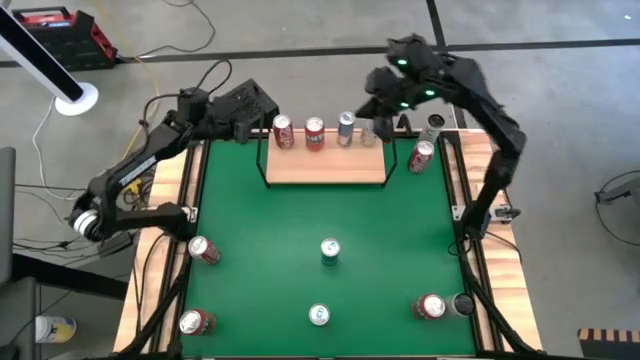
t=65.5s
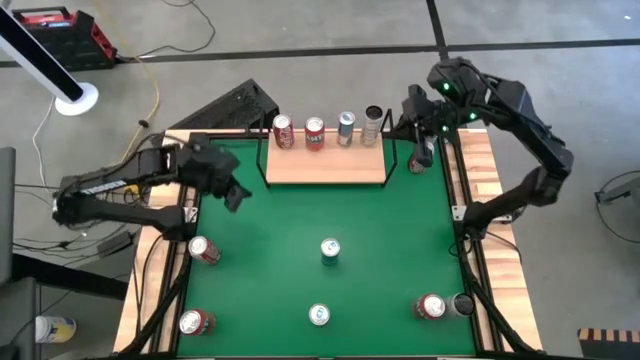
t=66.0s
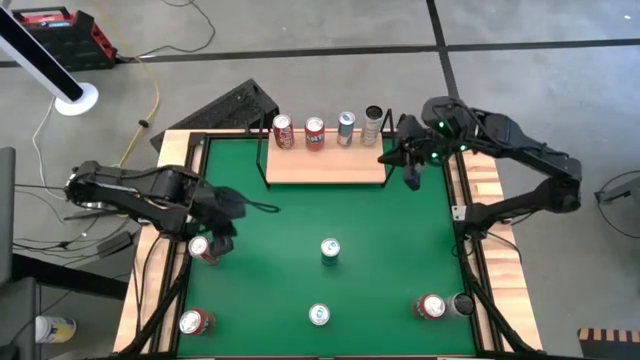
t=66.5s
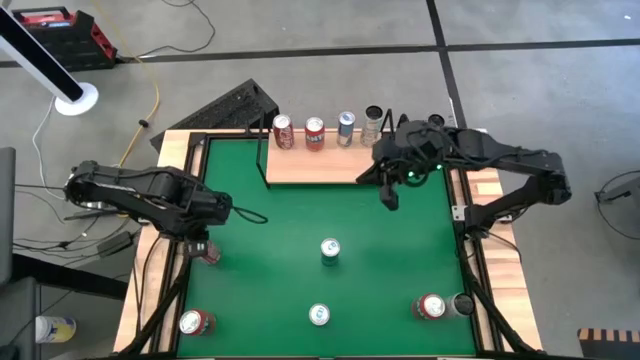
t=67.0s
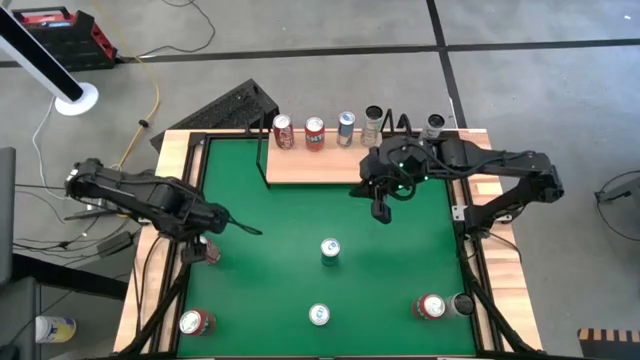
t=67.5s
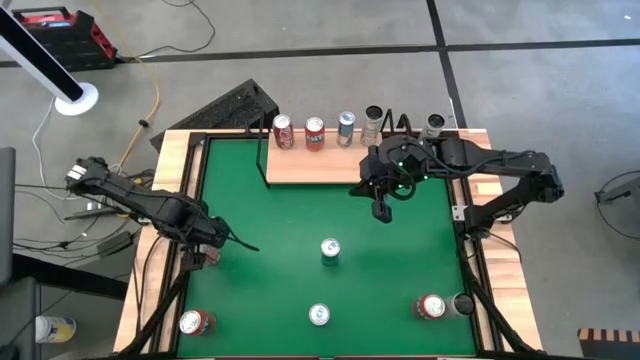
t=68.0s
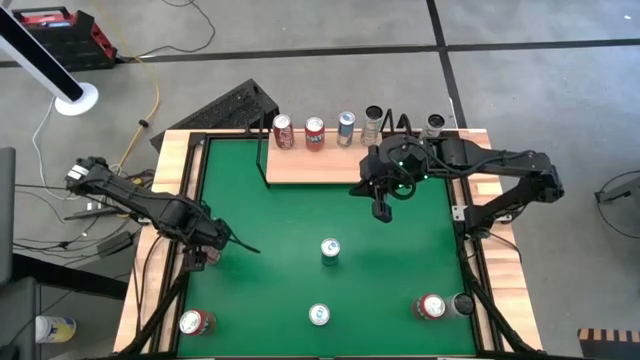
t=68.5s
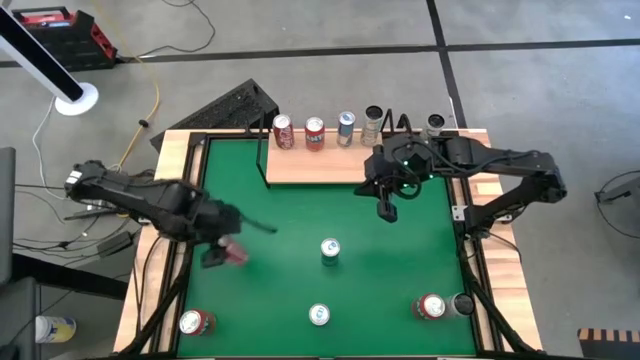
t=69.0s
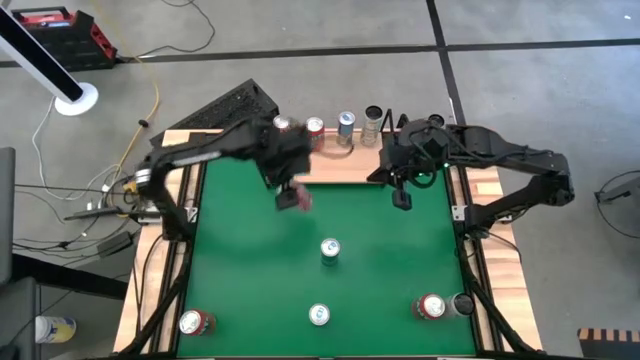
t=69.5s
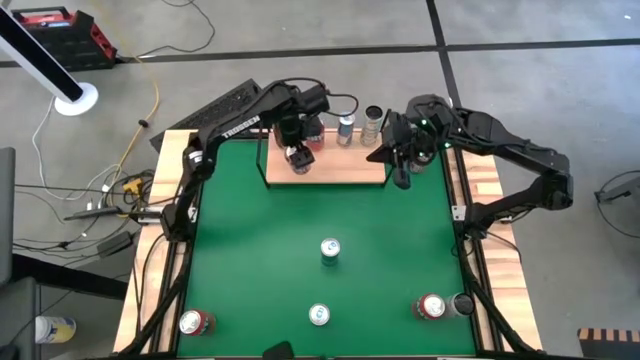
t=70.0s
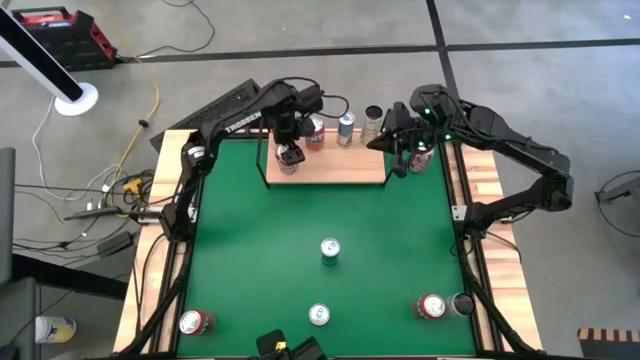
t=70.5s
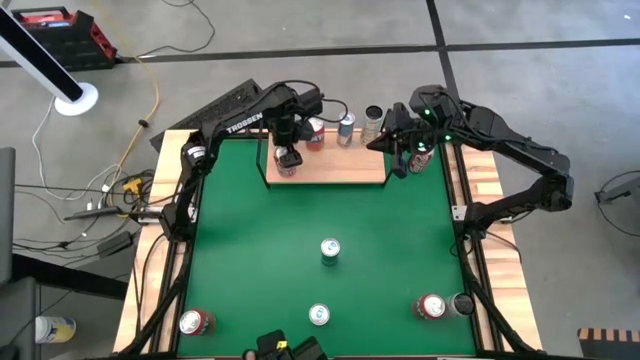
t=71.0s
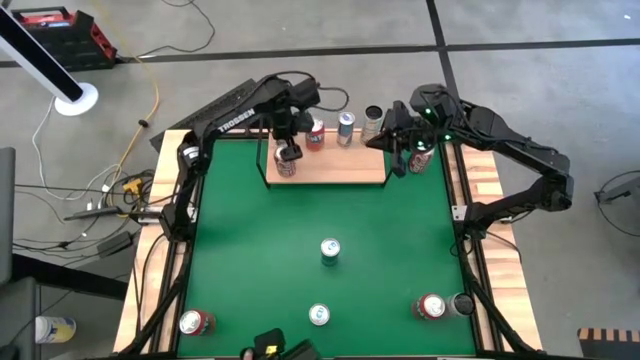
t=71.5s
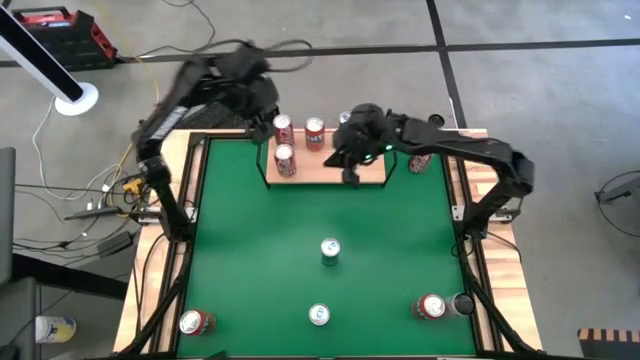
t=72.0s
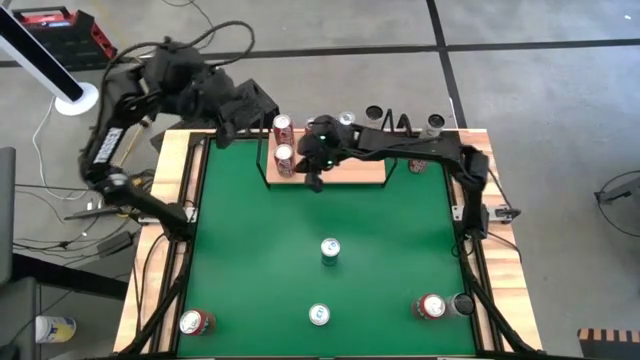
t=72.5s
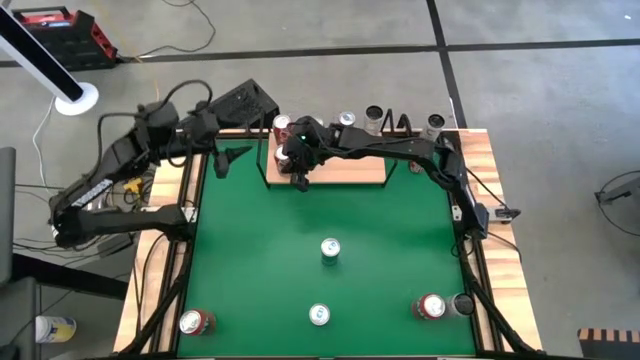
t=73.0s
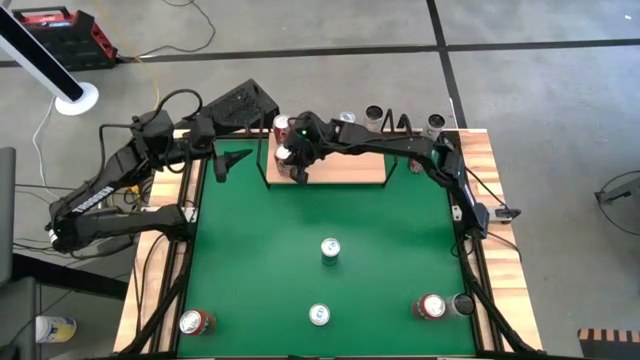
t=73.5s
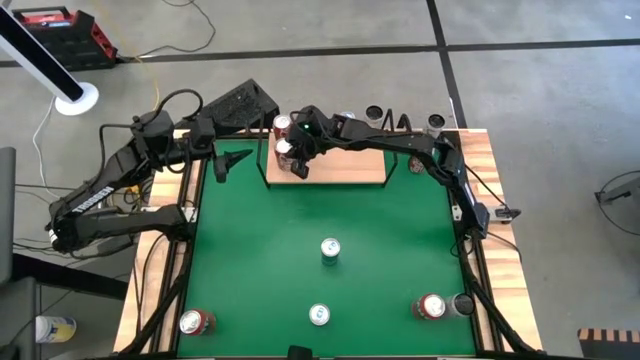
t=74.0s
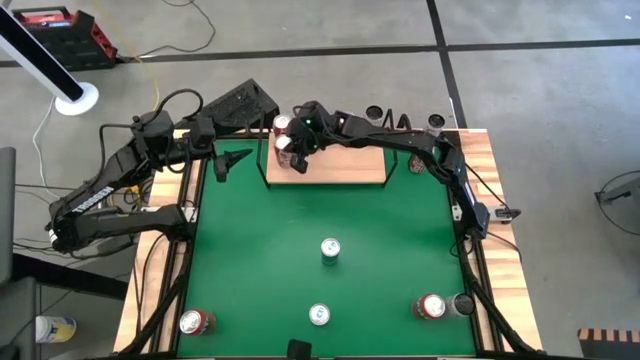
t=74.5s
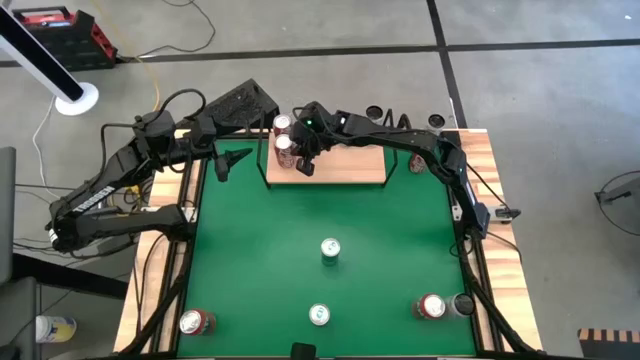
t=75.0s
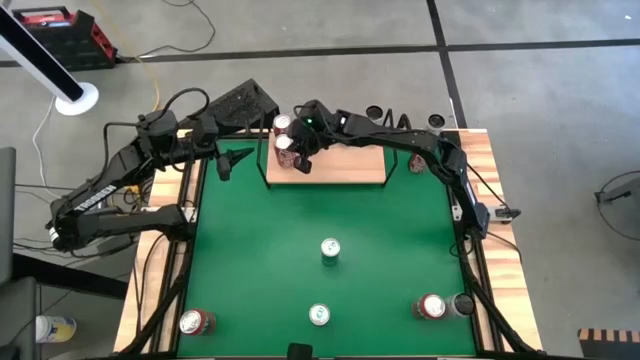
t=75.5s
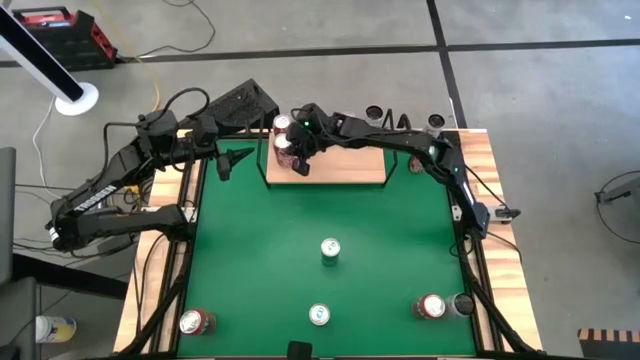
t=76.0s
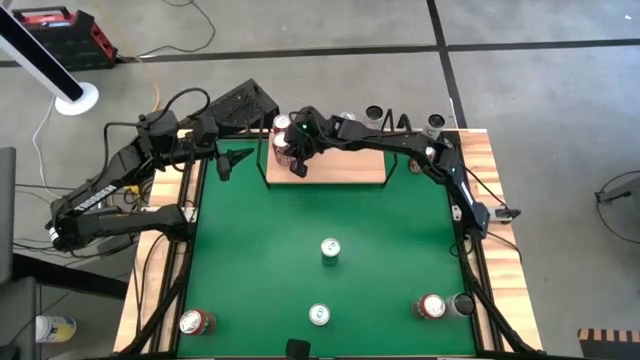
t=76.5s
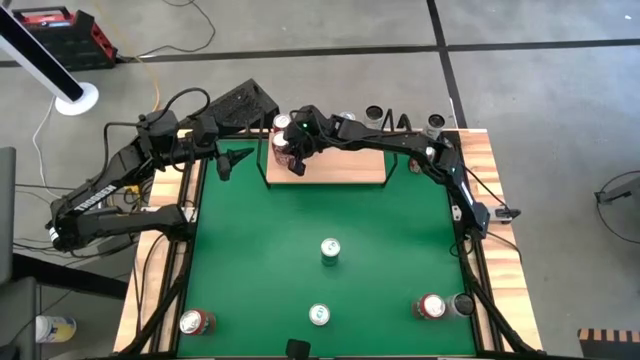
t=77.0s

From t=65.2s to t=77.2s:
Task: Place canned beverage on shelf
Put the left red soda can on the shelf

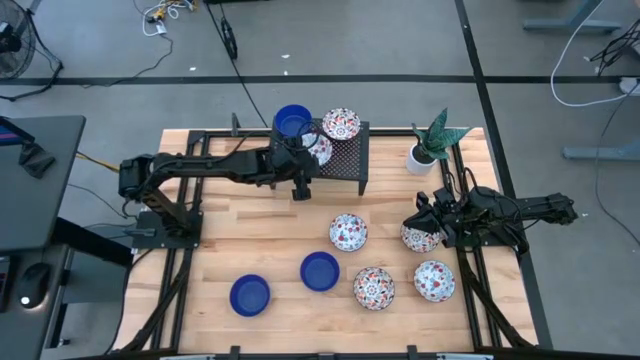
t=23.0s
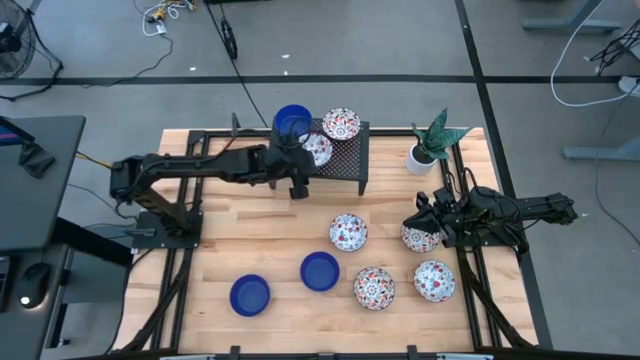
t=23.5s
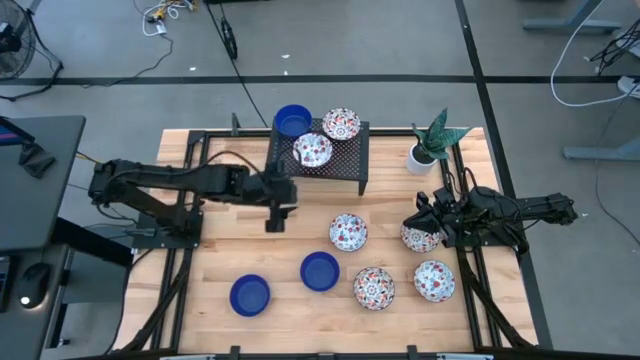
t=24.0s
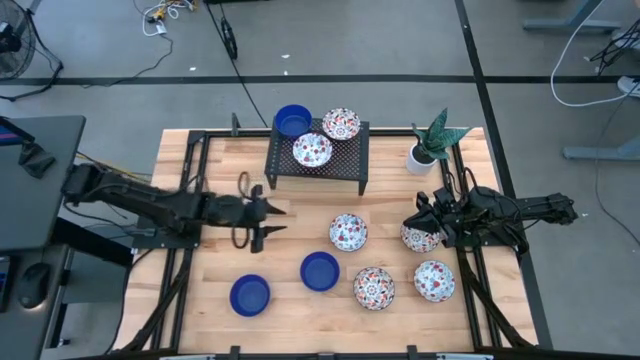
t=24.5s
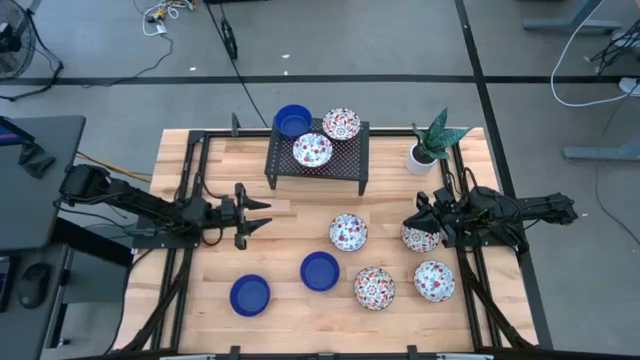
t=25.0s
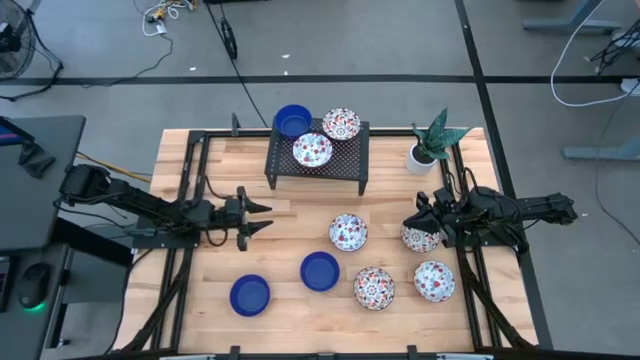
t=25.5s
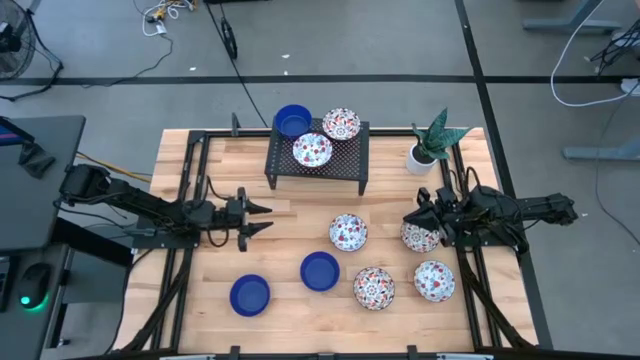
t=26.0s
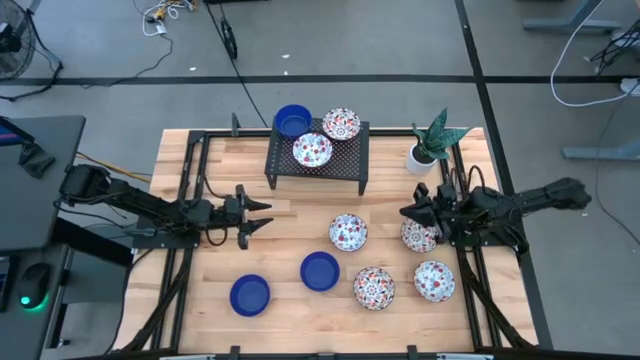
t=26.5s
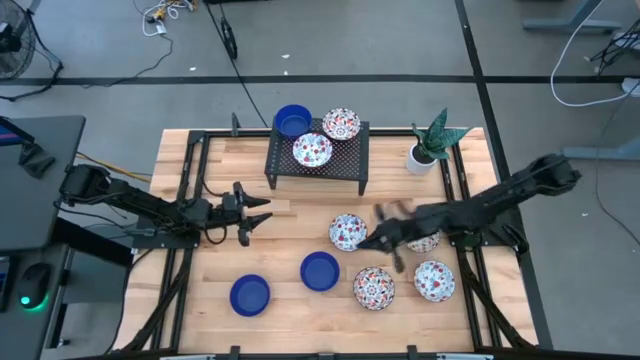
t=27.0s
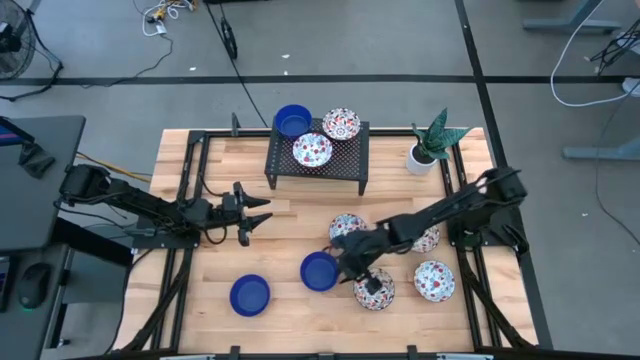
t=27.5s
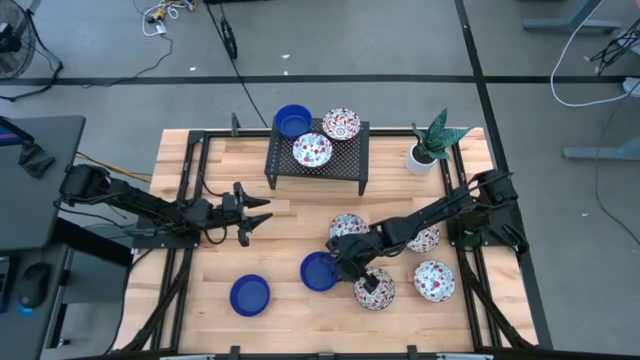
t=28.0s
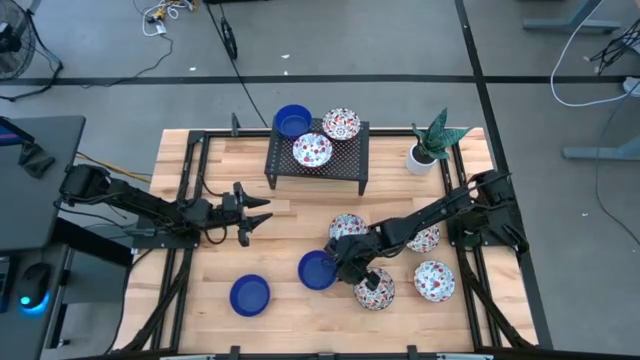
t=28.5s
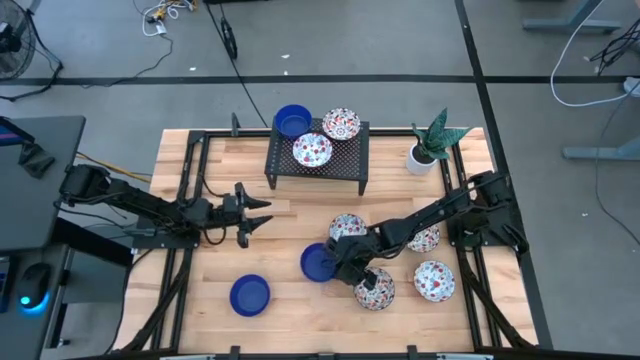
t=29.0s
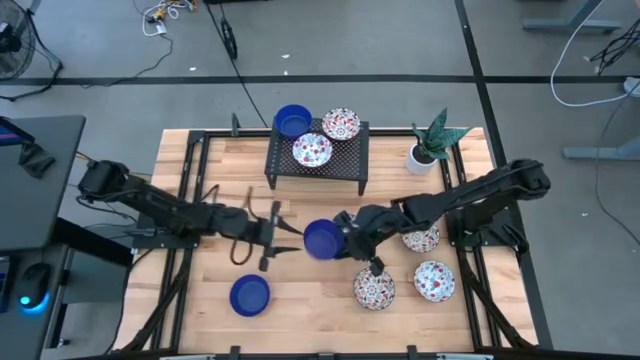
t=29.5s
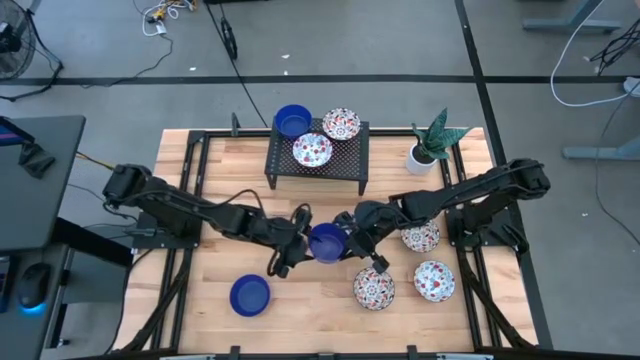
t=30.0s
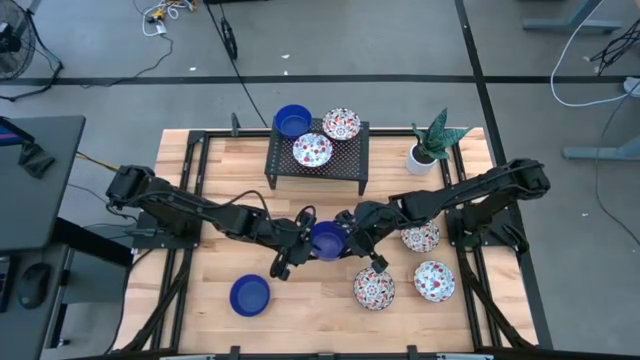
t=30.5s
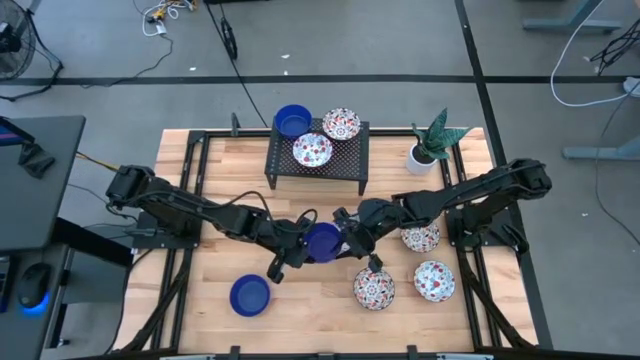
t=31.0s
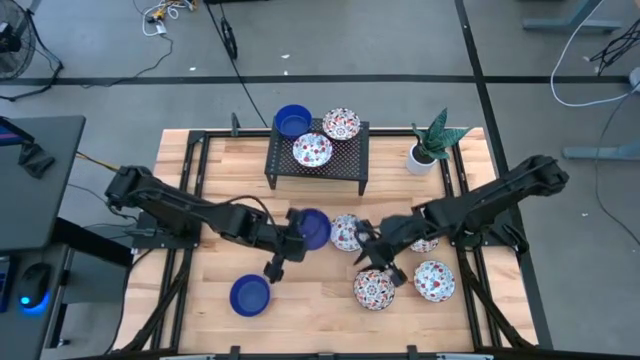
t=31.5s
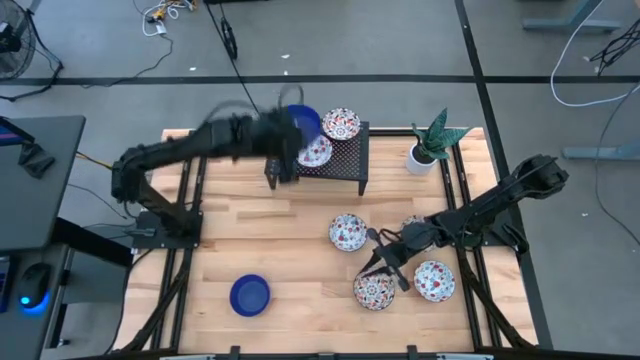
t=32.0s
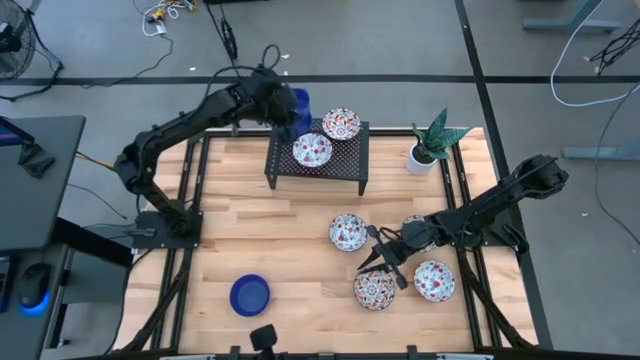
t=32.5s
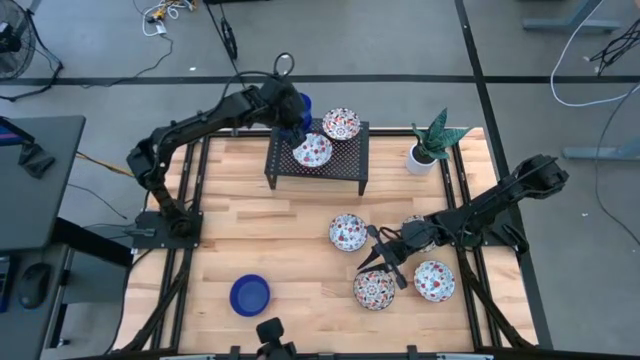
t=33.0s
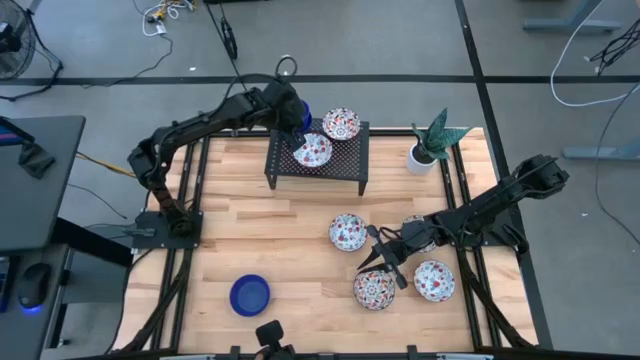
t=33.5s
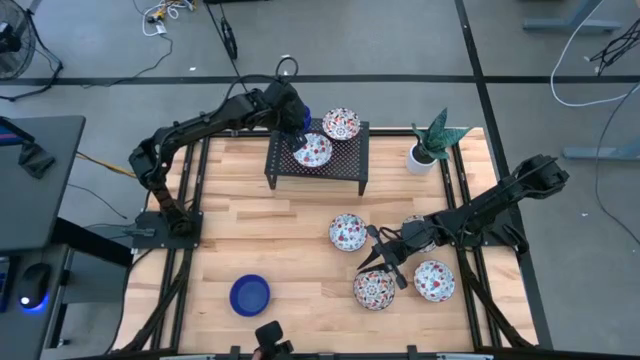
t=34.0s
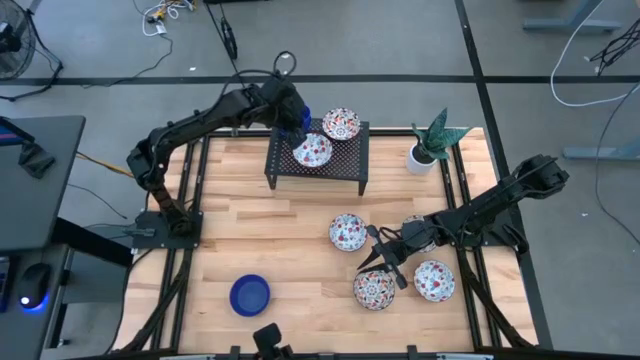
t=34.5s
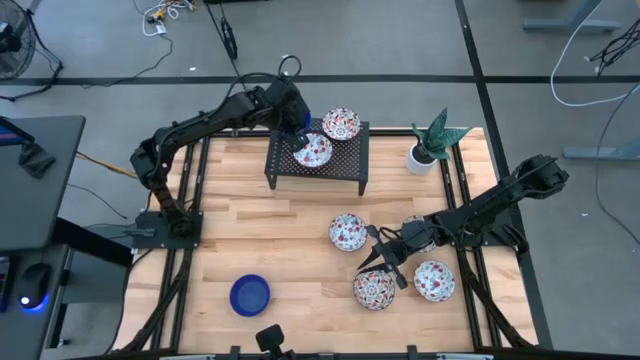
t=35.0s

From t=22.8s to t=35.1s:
Task: Pick & Place Mini bowls
Stack the right blue bowl on top of the other blue bowl on the shelf
